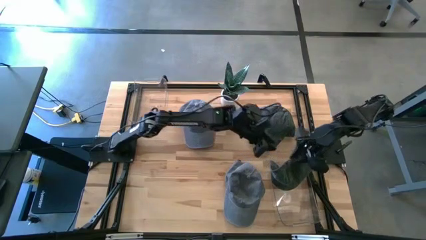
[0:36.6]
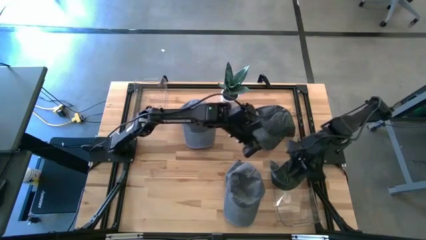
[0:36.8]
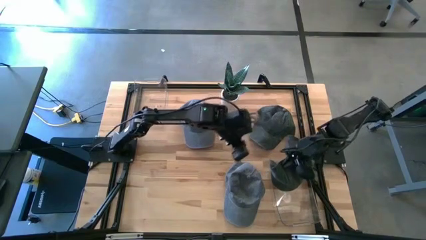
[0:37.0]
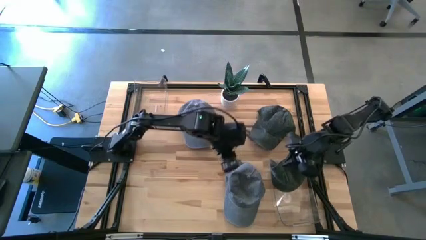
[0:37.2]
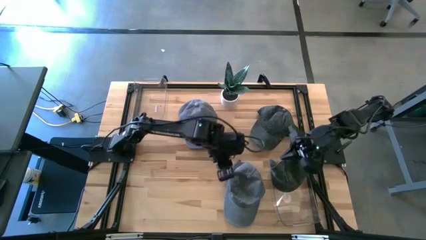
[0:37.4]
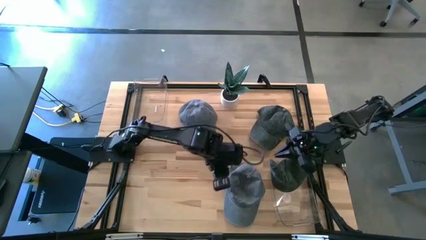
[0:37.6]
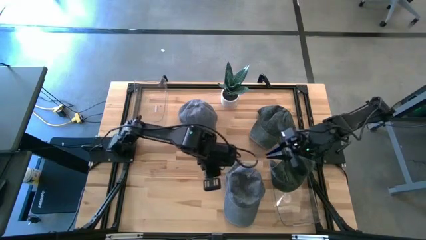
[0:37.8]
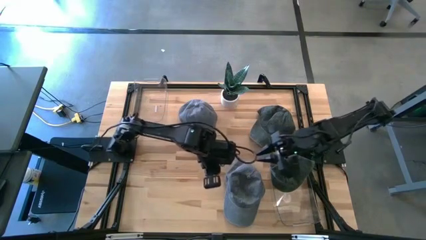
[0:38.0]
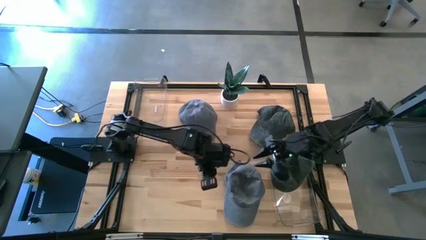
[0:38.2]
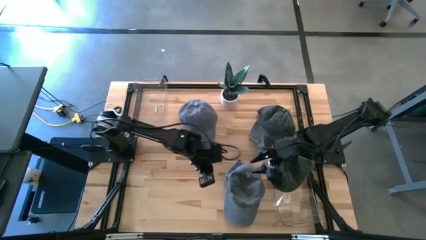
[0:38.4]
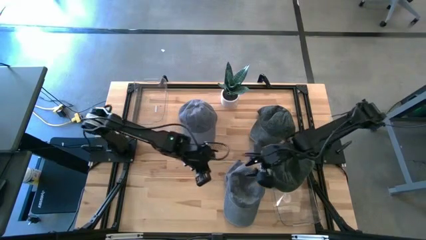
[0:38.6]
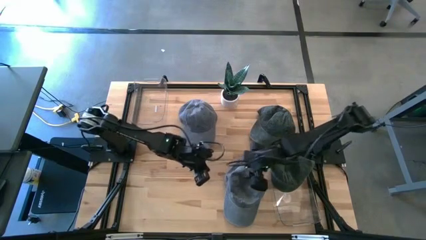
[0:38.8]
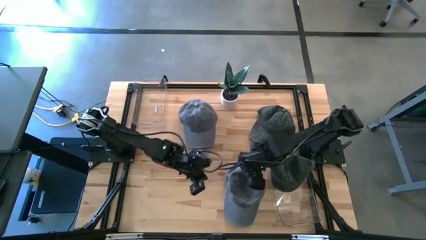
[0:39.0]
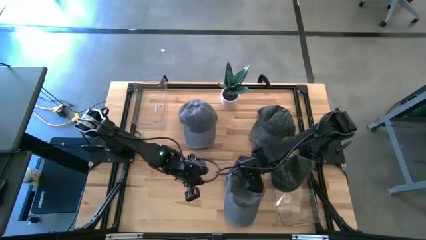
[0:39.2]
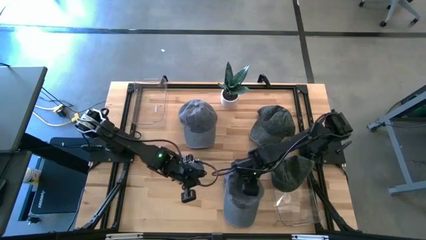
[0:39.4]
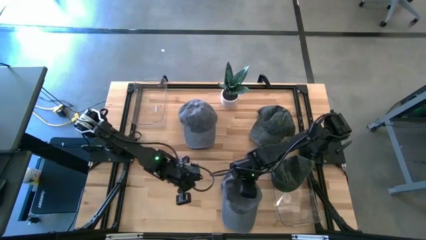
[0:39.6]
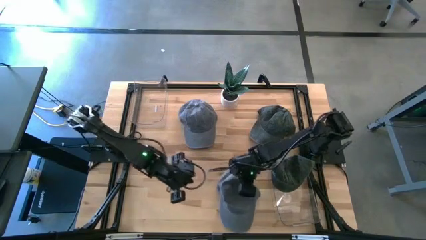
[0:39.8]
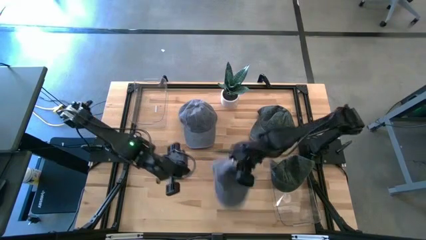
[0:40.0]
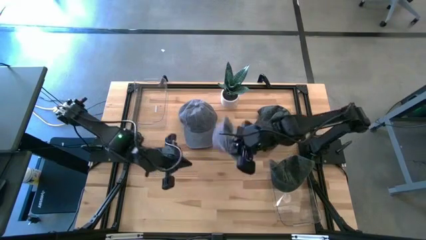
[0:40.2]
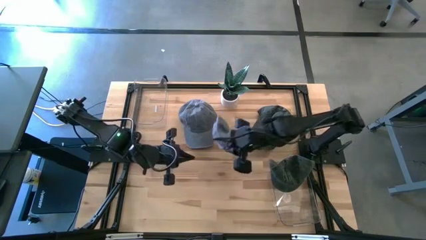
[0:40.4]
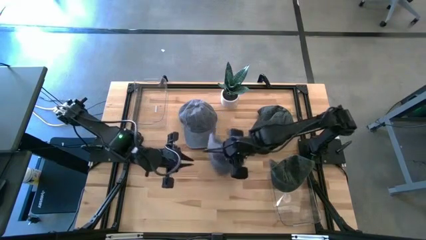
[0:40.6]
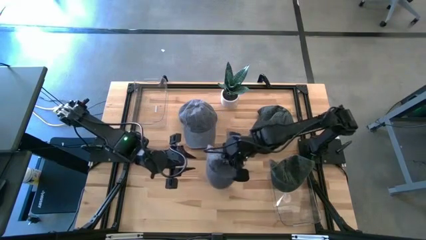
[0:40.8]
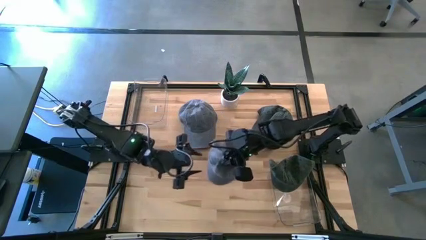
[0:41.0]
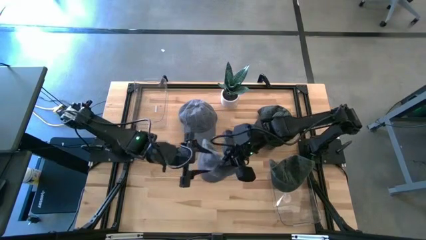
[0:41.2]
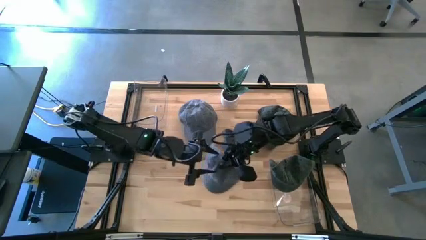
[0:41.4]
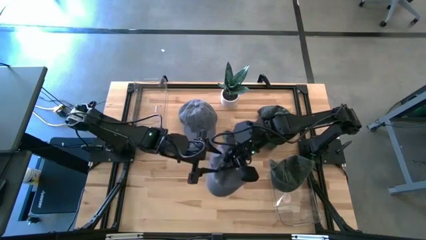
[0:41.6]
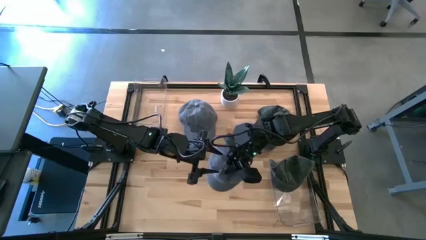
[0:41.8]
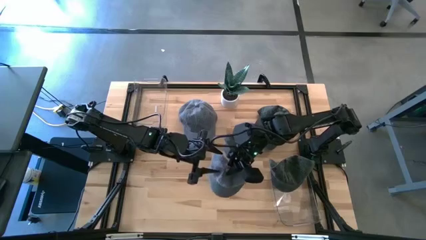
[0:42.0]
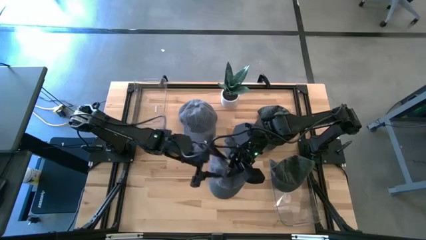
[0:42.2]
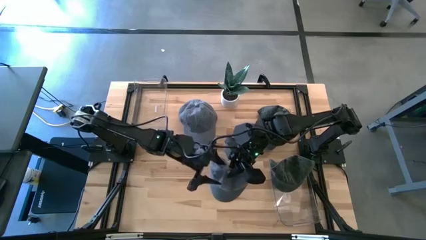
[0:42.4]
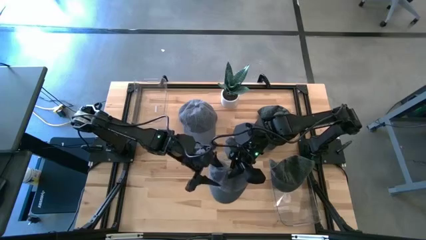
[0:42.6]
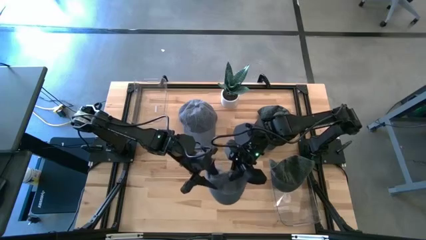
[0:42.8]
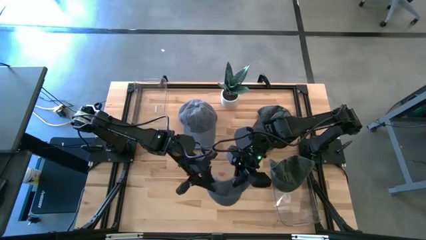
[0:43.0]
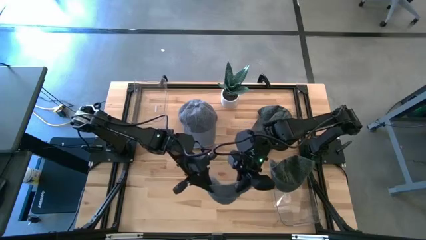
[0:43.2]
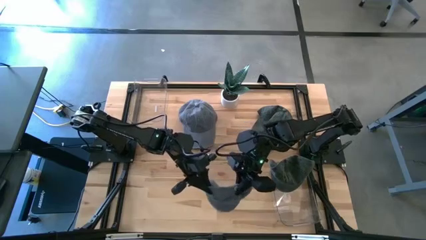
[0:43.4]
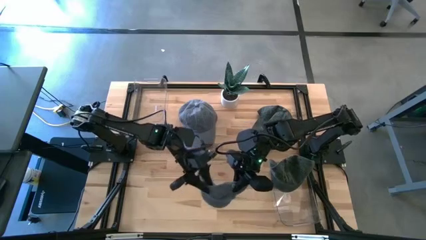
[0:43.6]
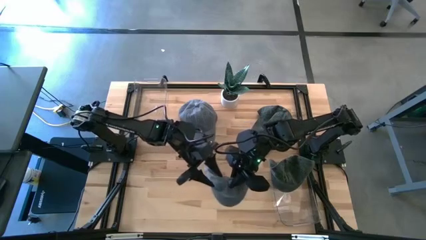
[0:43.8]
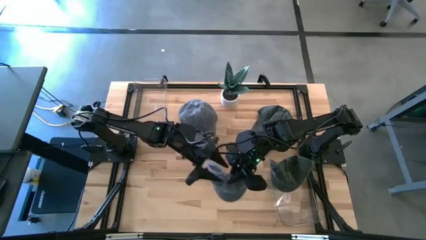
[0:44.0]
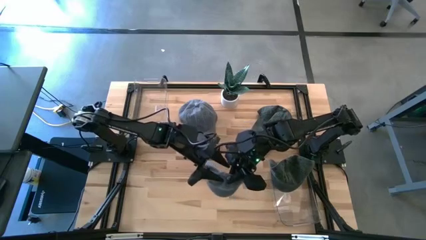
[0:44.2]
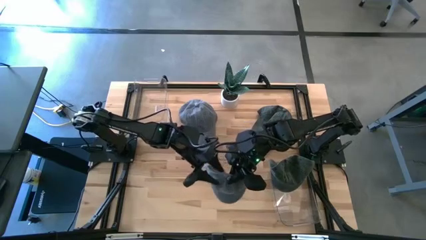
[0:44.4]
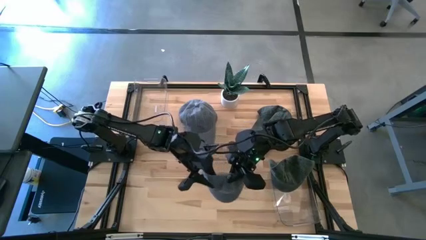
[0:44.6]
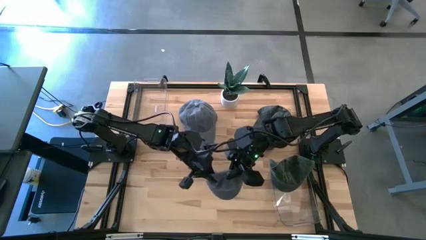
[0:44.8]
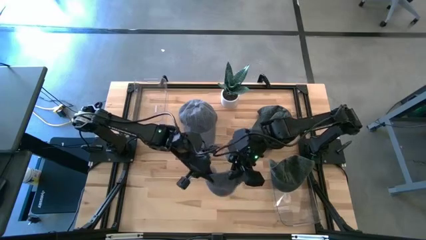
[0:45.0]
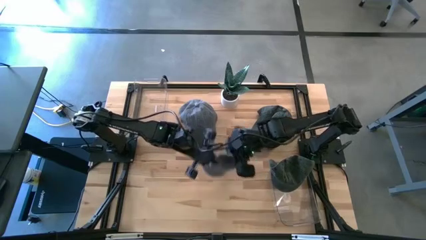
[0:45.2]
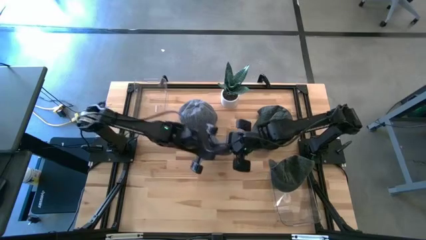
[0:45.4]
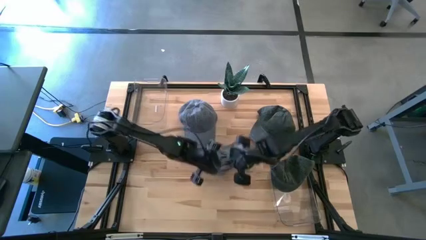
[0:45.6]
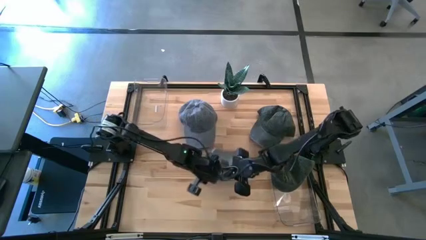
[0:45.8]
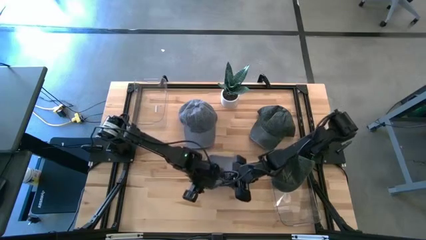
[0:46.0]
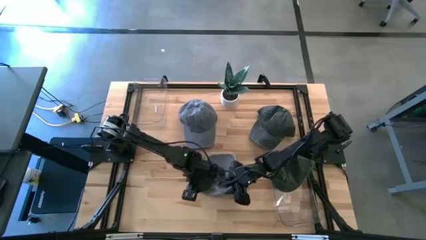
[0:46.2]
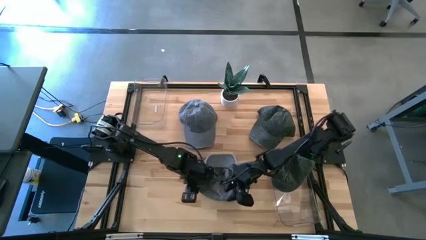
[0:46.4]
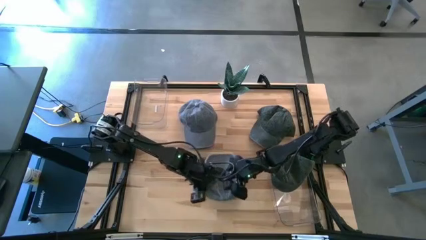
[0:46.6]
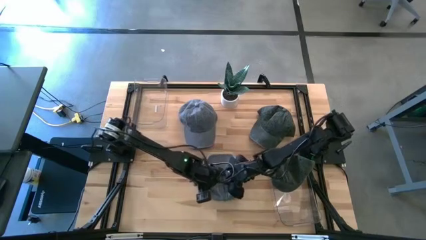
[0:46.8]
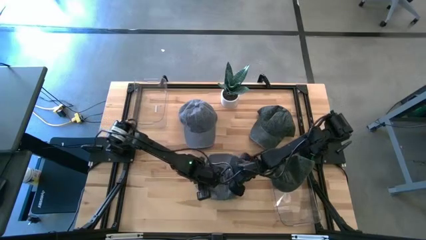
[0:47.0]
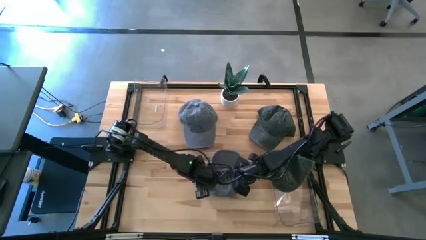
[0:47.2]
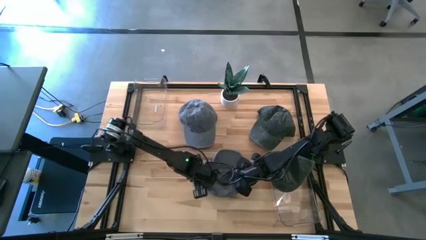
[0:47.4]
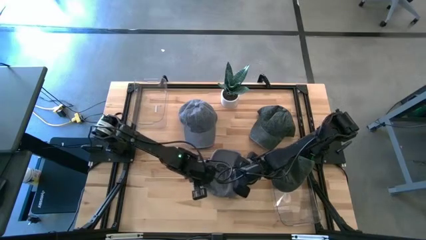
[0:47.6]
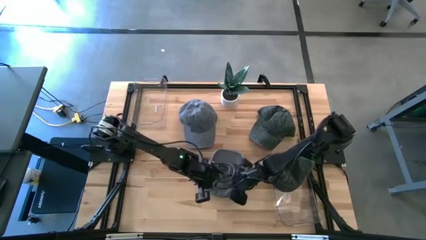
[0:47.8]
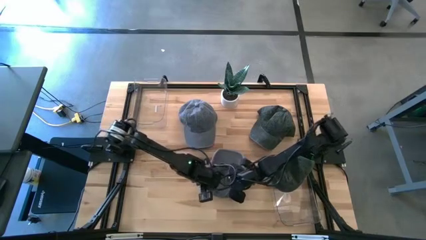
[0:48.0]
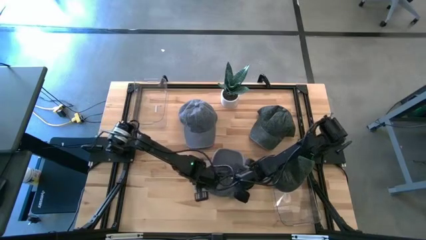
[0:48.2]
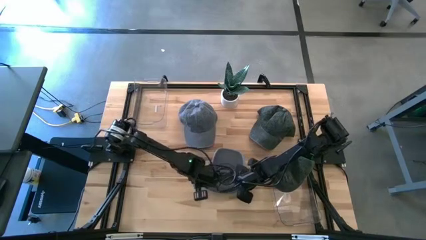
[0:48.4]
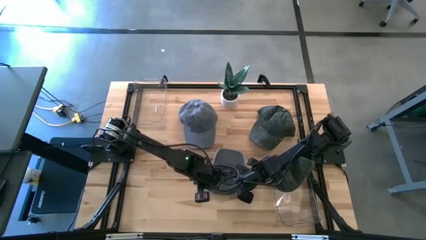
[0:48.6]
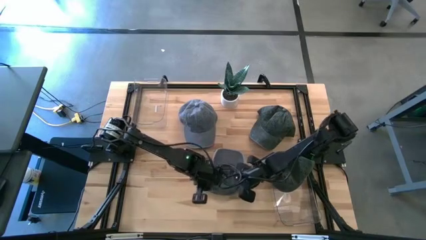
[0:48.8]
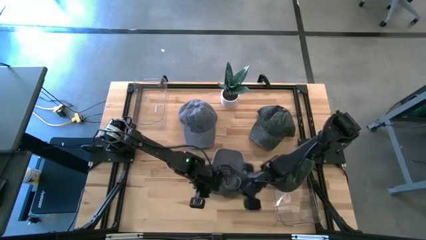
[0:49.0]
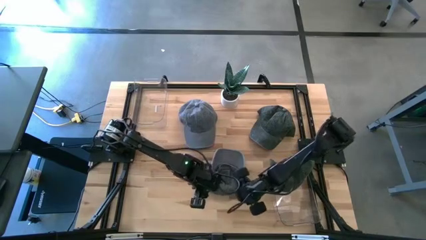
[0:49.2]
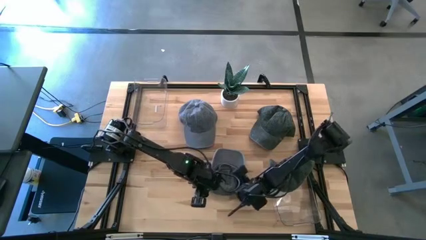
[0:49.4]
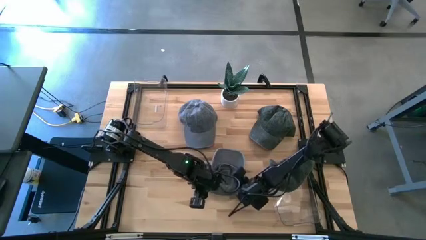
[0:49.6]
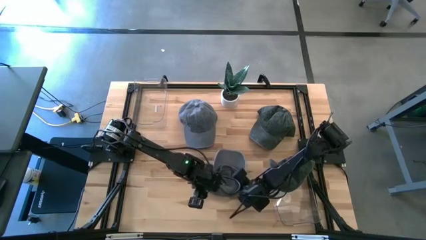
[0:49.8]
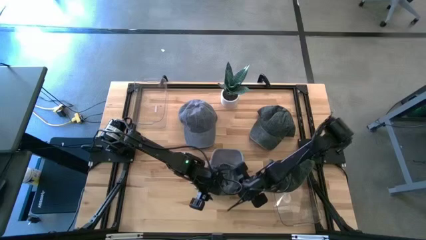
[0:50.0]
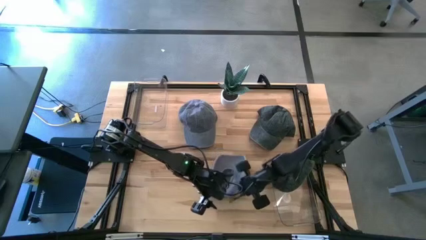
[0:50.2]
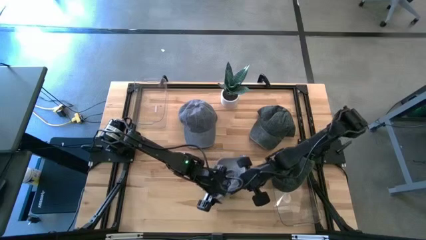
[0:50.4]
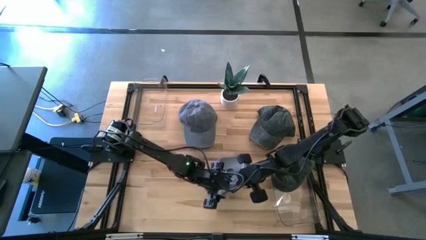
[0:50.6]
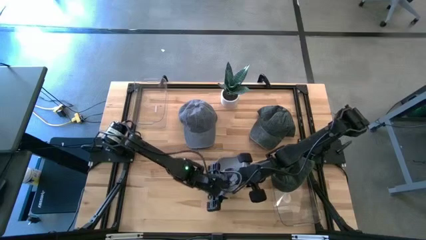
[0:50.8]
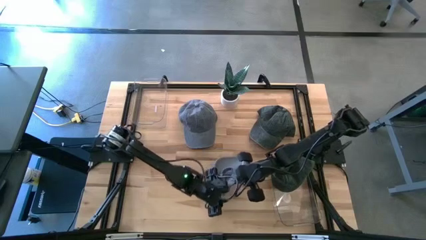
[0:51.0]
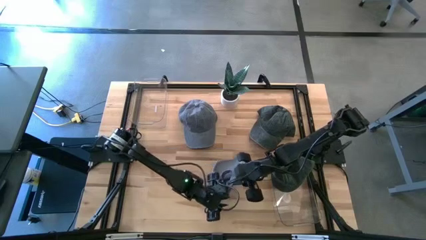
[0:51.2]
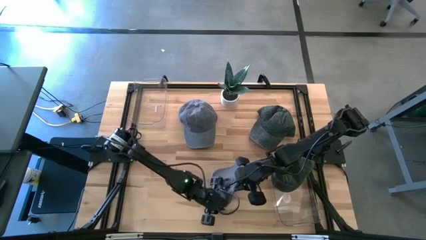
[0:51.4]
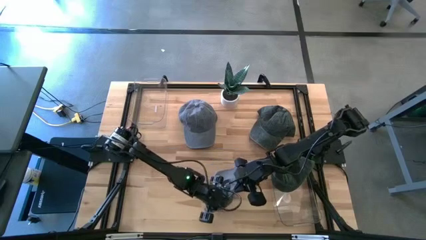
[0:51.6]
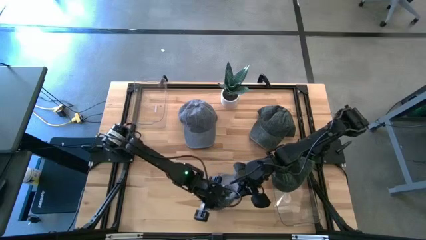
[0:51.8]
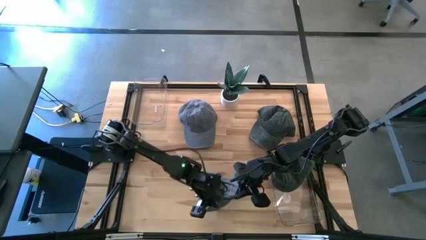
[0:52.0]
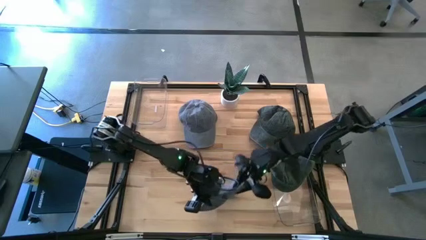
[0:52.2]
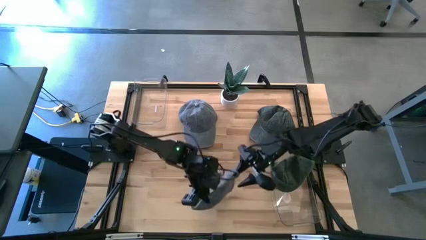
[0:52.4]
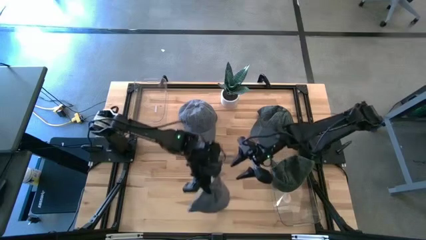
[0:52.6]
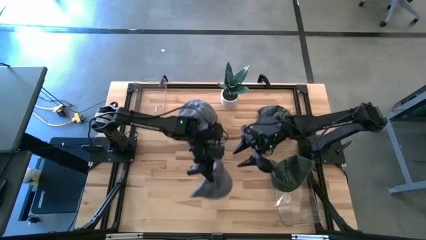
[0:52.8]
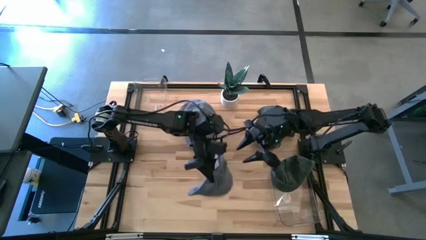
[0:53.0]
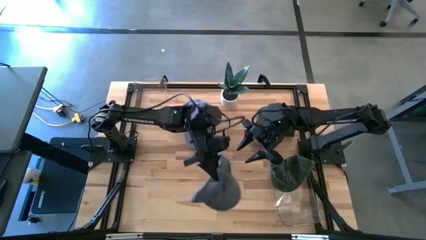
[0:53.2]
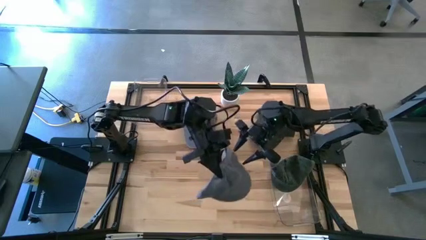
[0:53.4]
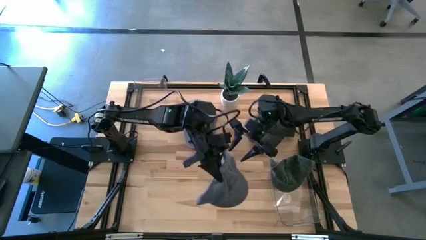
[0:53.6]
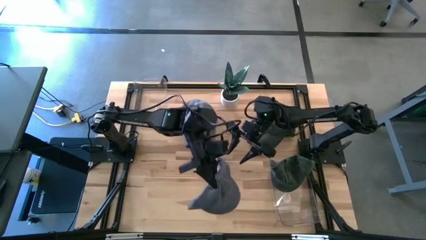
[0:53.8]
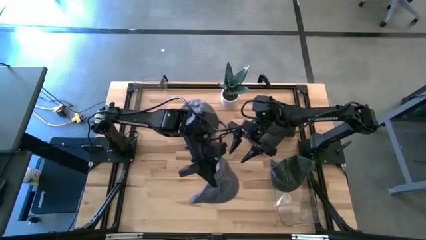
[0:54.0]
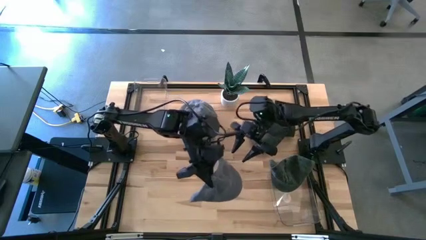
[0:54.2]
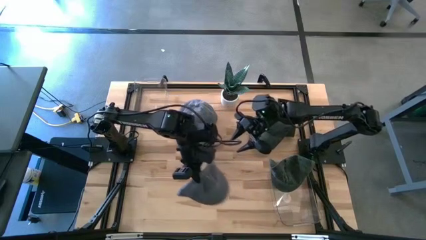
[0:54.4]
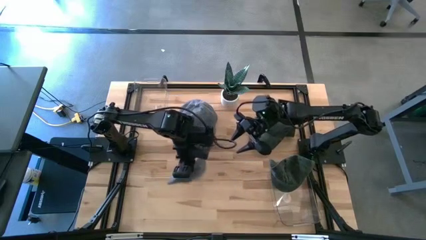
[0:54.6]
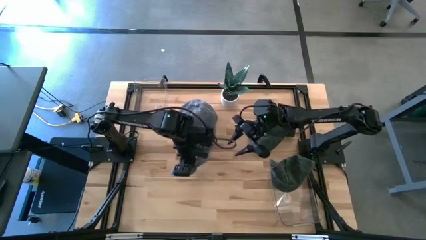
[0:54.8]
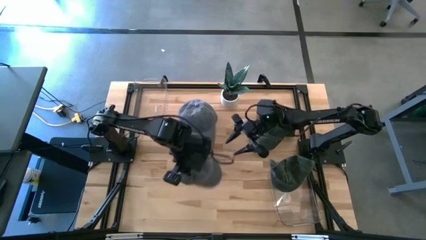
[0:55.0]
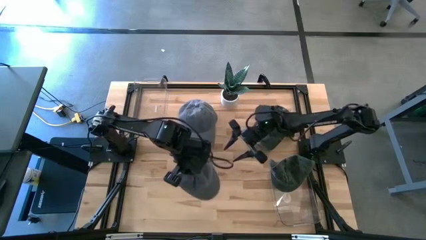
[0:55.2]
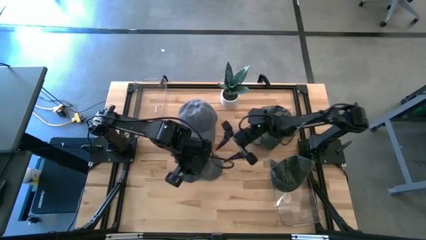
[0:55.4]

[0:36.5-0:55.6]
Task: Pick & Place hat
Put the bottom gray cap into the top transparent bin
